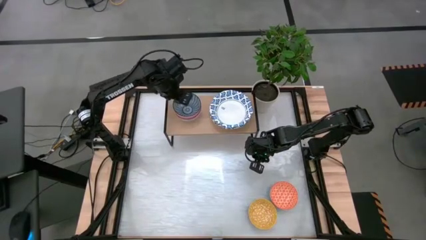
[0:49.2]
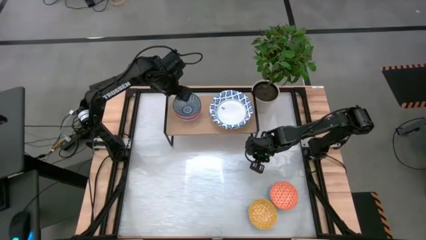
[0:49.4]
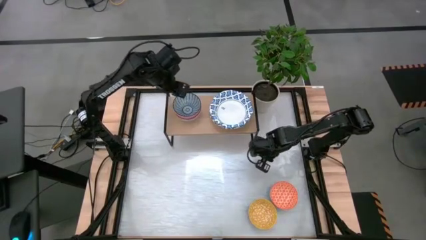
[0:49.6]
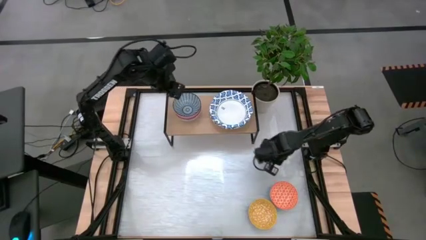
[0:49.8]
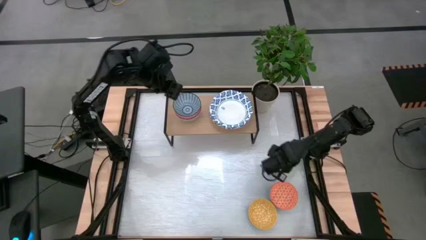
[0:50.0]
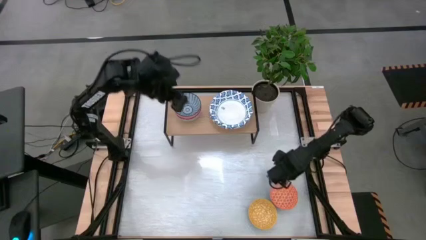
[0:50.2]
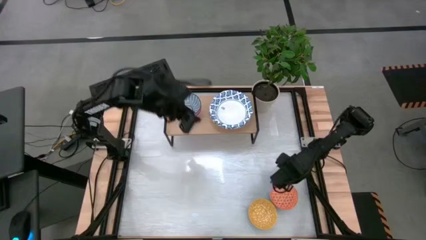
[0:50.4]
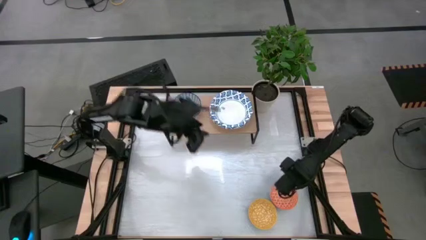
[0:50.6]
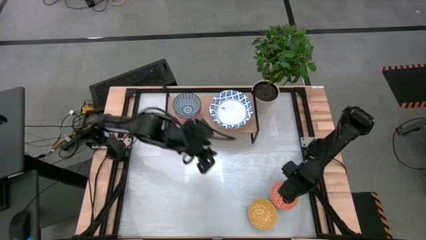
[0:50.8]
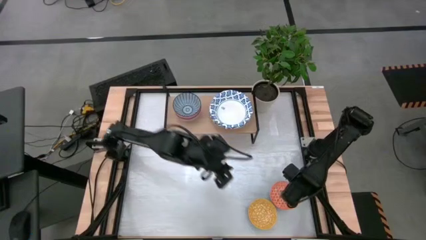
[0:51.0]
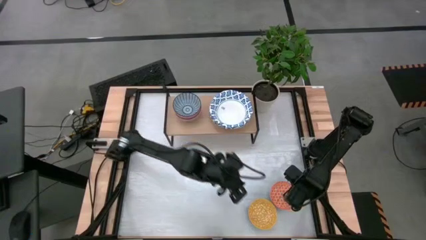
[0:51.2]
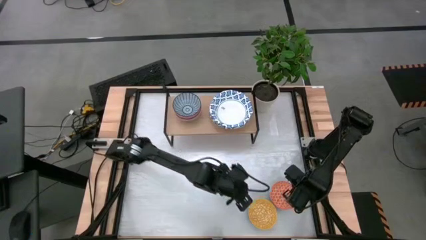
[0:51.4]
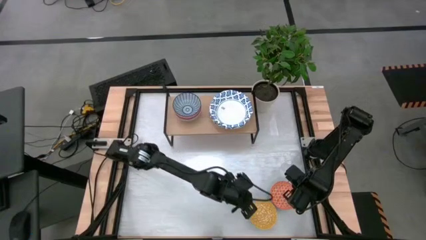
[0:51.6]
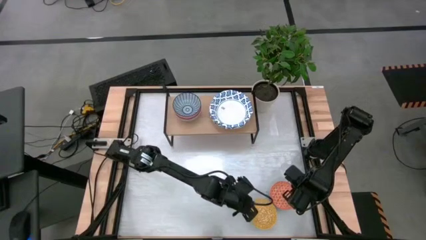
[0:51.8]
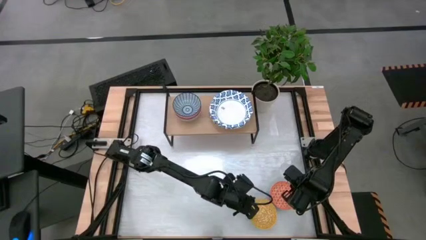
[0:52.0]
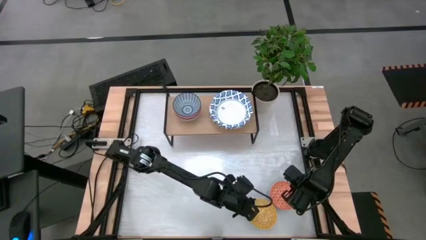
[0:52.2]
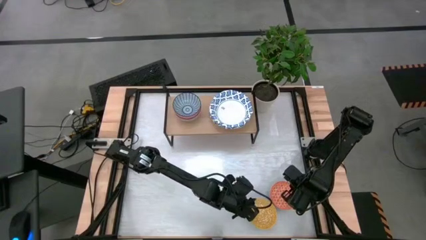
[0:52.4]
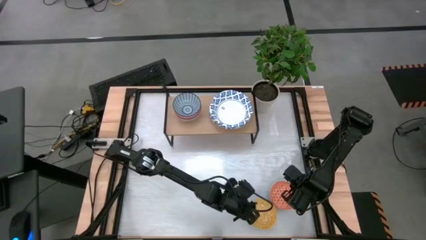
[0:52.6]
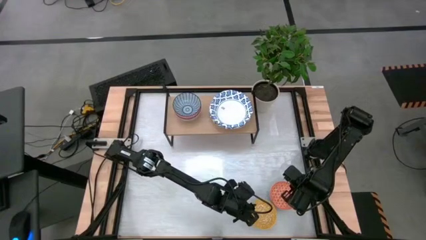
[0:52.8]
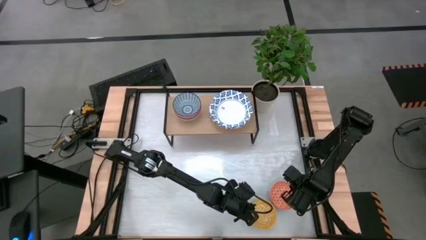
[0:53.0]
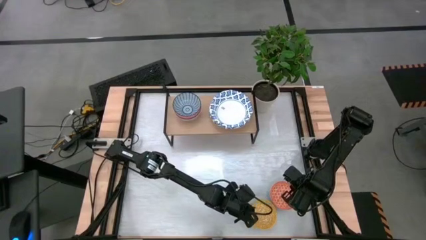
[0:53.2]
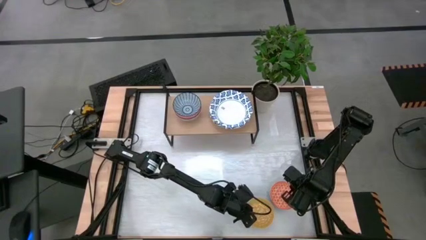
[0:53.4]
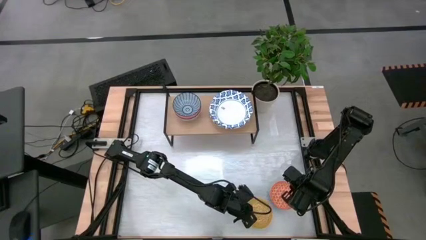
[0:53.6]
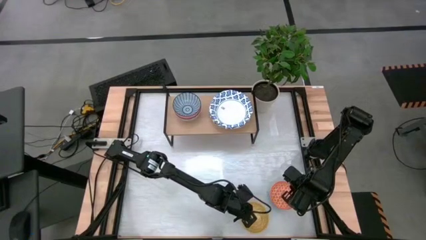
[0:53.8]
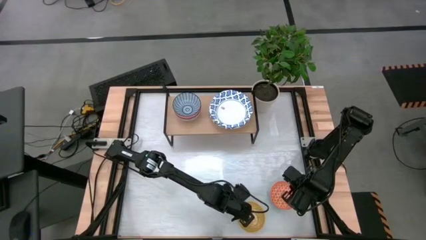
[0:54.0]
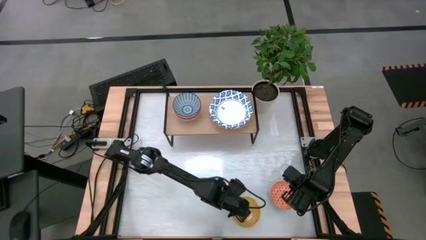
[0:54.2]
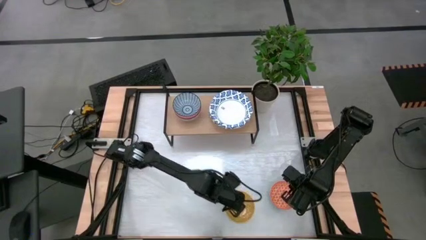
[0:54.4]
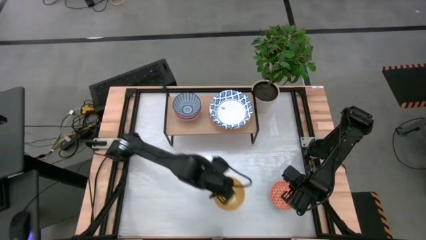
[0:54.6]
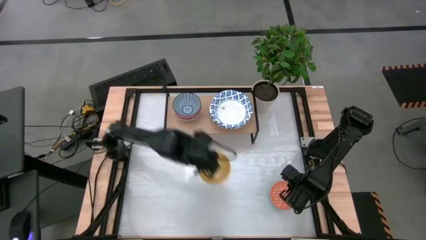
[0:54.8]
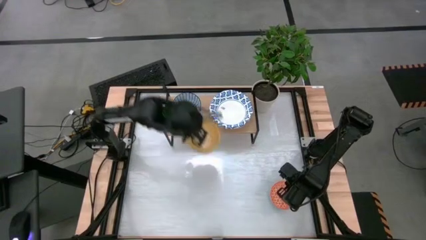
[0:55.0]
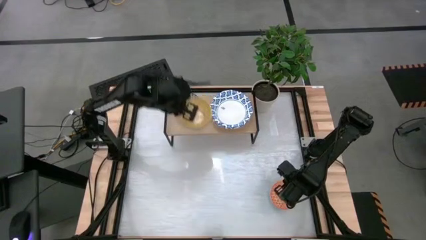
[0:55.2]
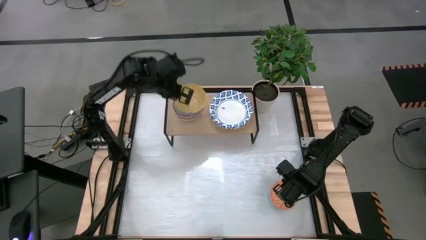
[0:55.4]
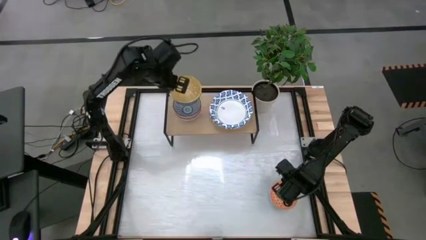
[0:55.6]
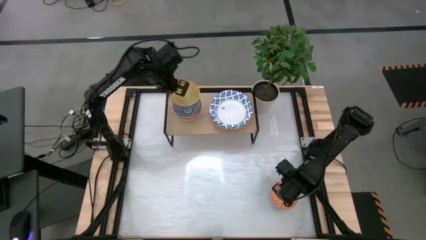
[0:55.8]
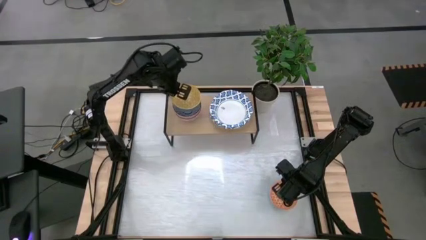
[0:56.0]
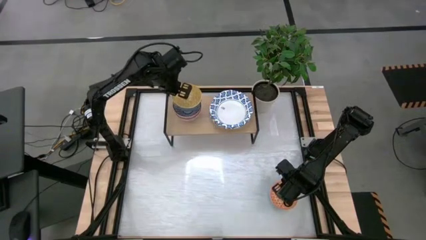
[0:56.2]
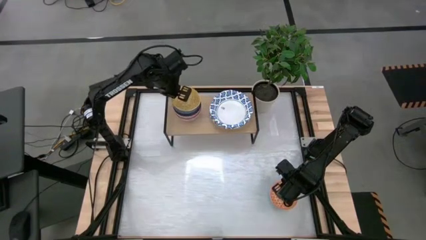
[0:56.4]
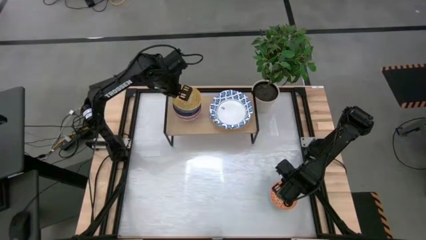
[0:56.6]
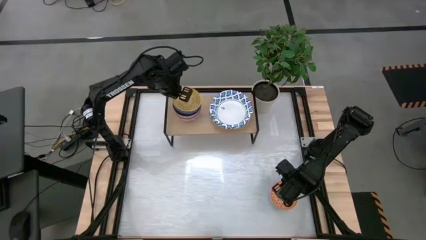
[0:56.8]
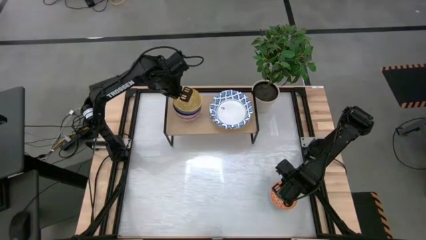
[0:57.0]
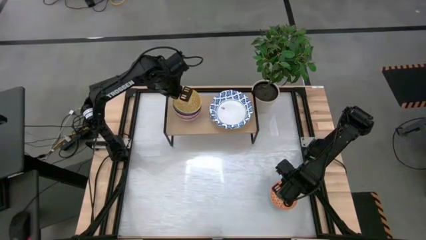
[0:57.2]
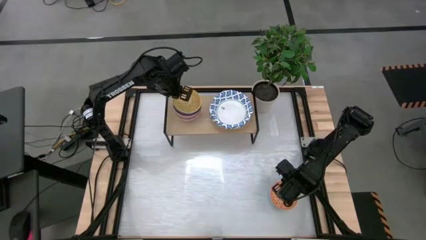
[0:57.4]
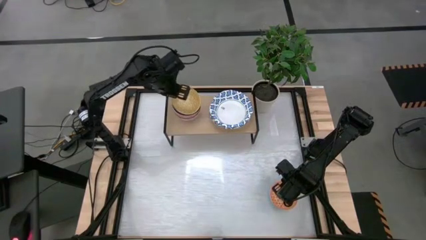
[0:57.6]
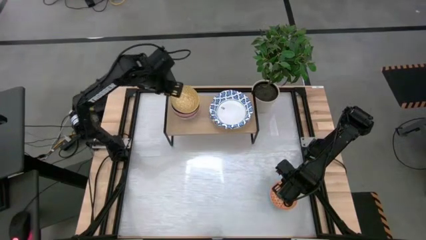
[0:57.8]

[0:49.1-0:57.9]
Task: Place and stack bowls onto a shelf
Stack the yellow patterned bowl on top of the blue patterned bowl on the shelf

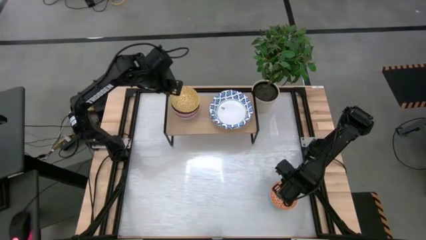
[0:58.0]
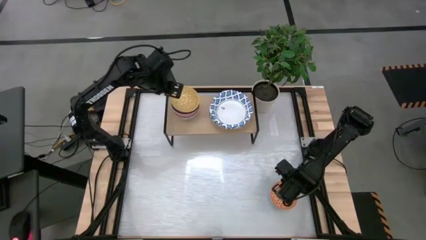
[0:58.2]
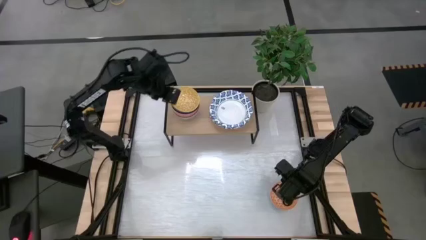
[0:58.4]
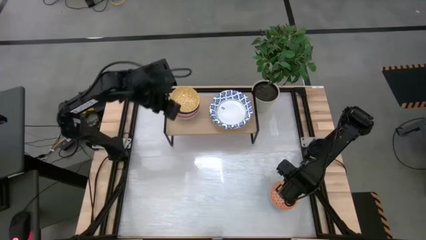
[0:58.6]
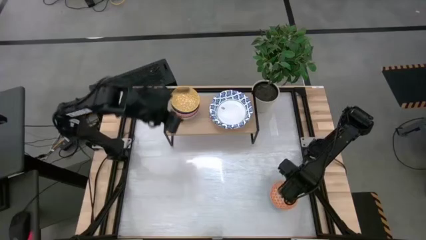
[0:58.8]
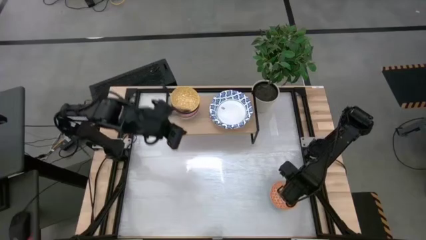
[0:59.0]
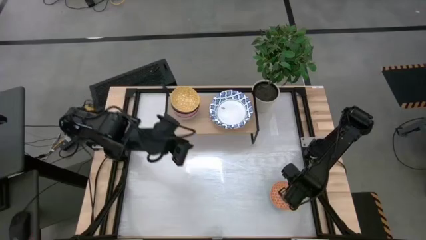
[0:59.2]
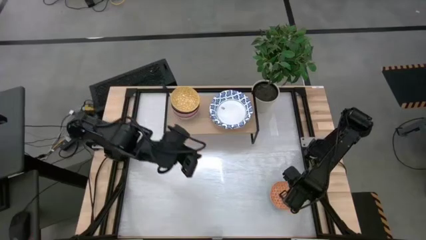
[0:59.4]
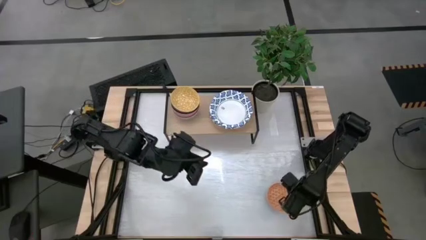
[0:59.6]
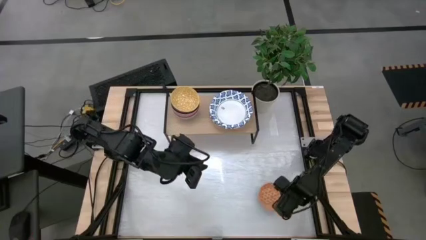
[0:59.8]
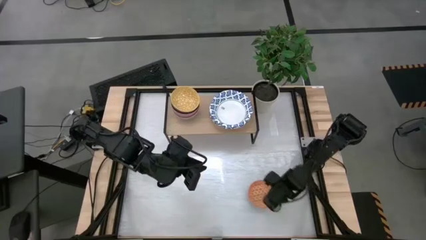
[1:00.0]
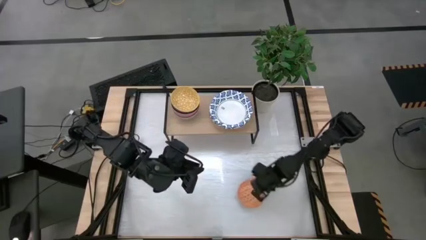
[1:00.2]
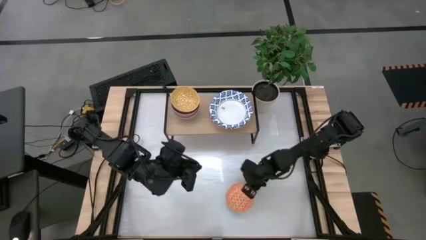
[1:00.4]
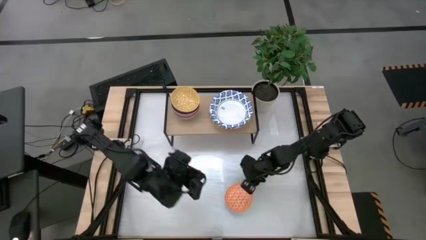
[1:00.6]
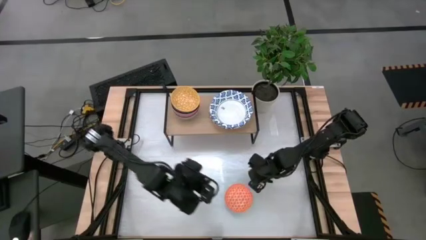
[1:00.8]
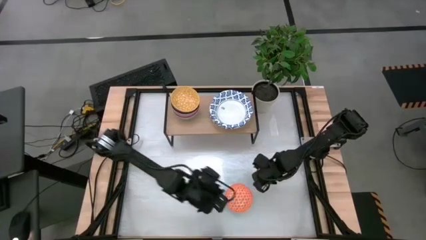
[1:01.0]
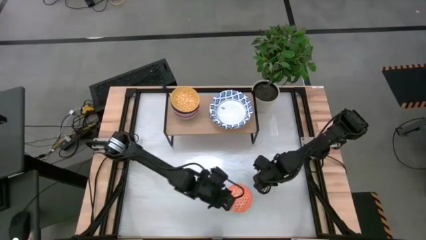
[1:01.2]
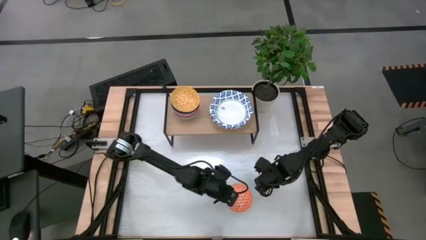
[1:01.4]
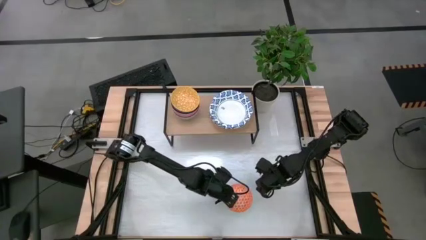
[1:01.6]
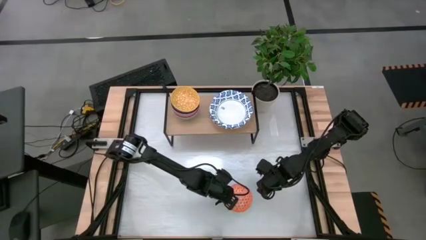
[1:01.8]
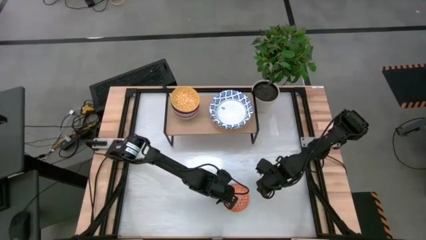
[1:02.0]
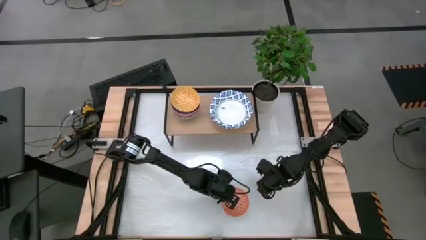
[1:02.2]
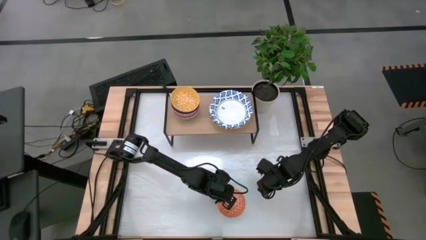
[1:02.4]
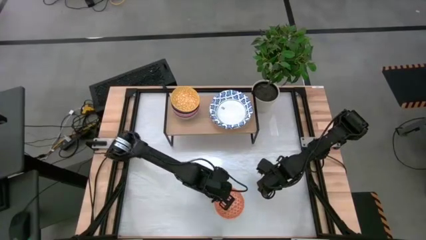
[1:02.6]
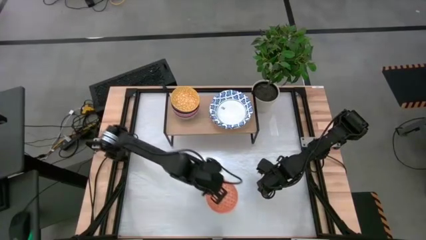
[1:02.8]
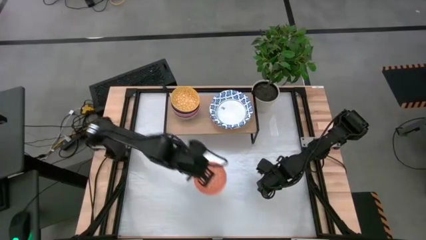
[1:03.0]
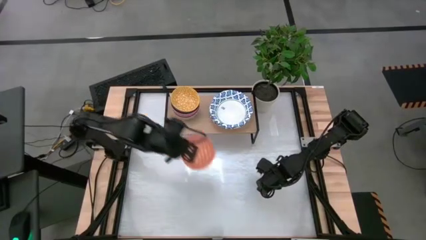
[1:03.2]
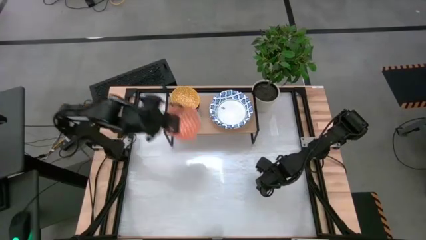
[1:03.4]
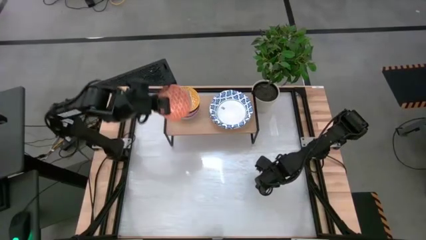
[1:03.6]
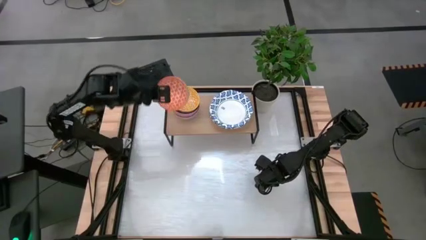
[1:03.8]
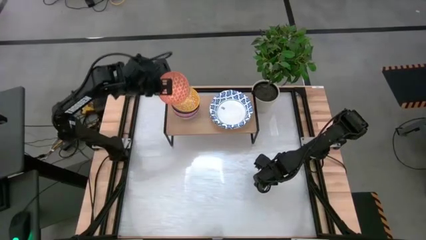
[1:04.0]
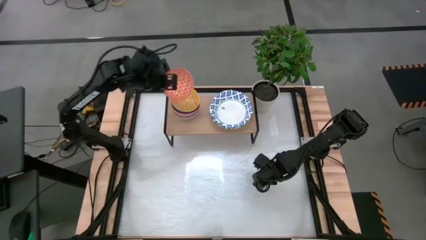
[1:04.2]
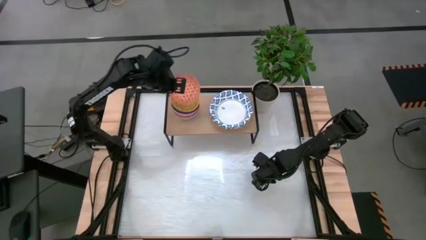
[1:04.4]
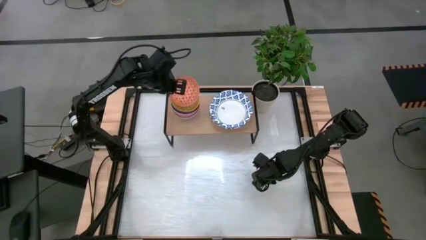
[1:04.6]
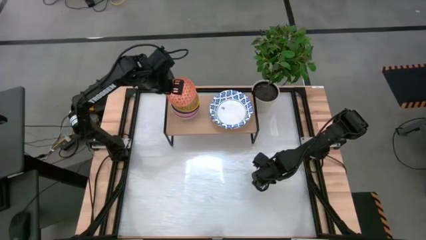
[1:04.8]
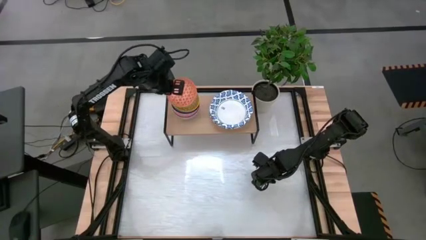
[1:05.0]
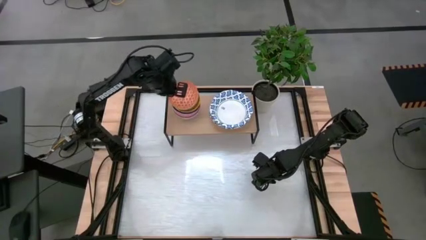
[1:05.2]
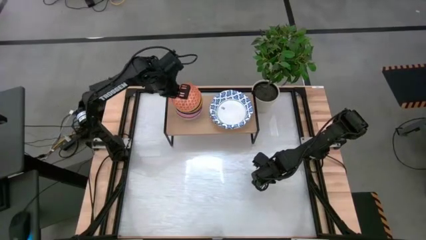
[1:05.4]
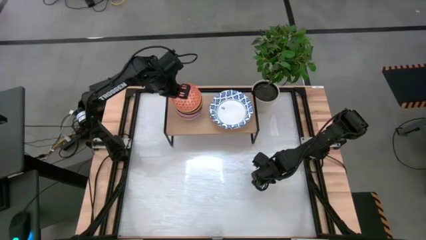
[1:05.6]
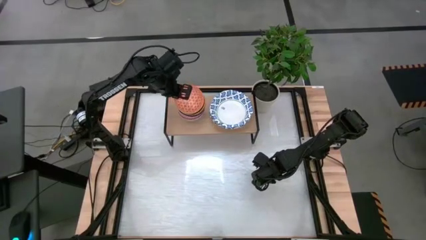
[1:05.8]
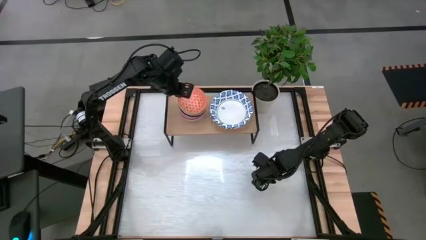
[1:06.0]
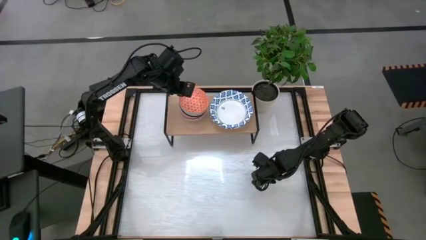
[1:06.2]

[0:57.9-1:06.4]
Stack the orange patterned bowl on top of the yellow patterned bowl on the shelf
